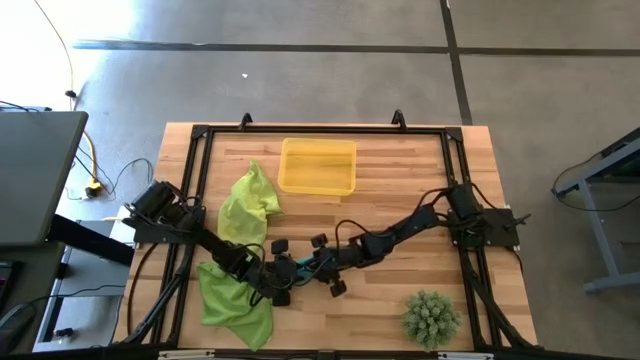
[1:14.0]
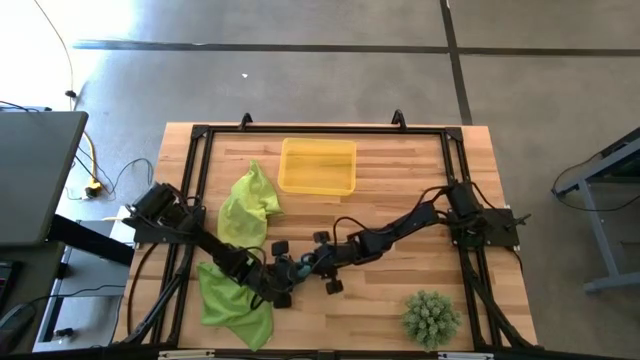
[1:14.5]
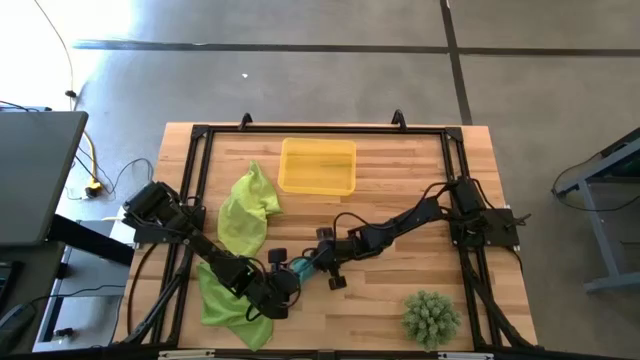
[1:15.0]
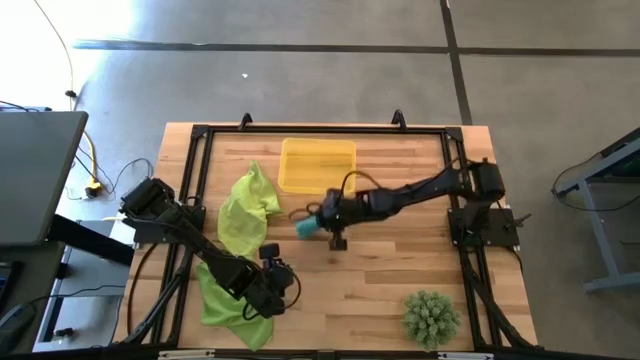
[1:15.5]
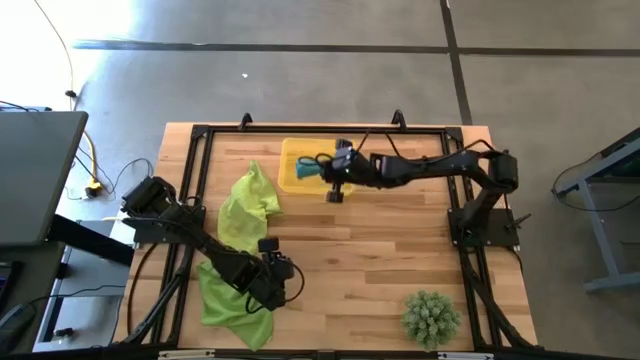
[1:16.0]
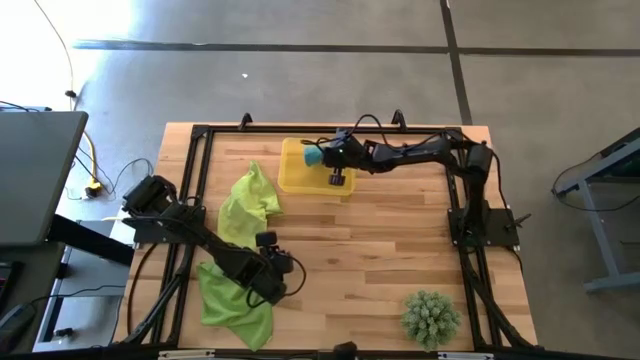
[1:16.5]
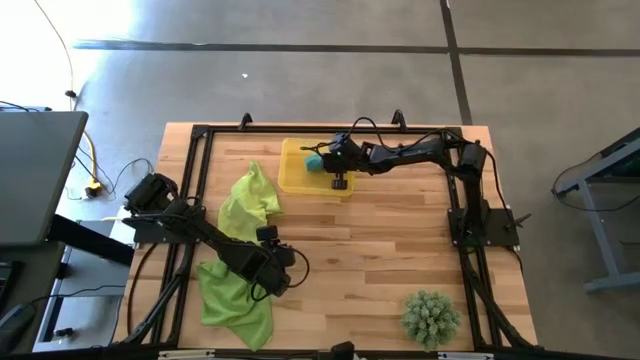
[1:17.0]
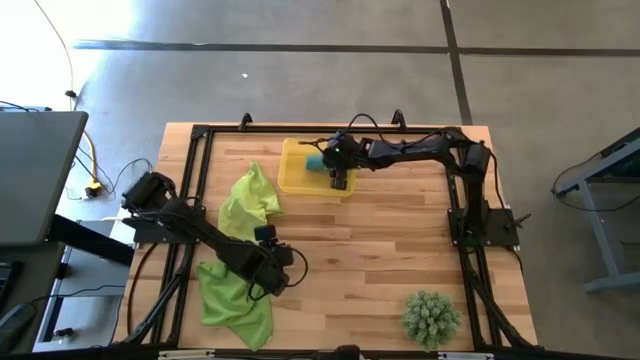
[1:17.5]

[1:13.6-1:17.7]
Task: Roll microfiber towels into tight, uniform cylinder then place into a basket
Put the rolled blue microfiber towel into the bin

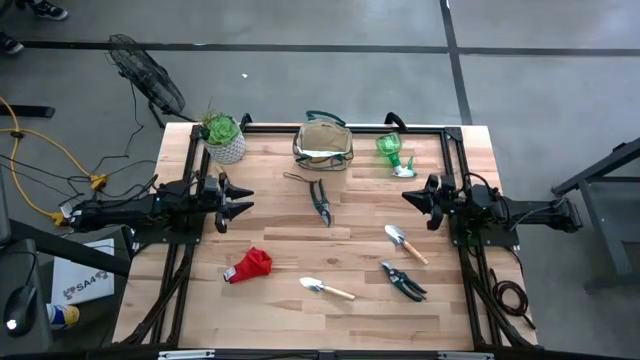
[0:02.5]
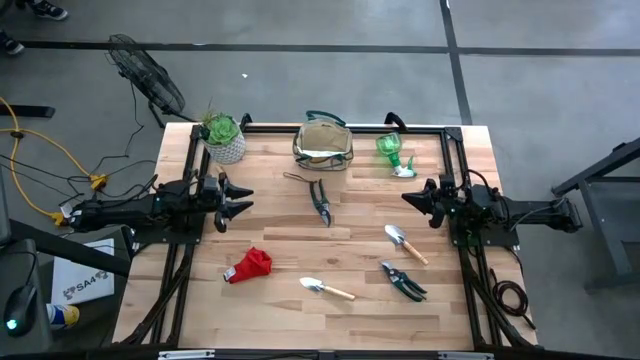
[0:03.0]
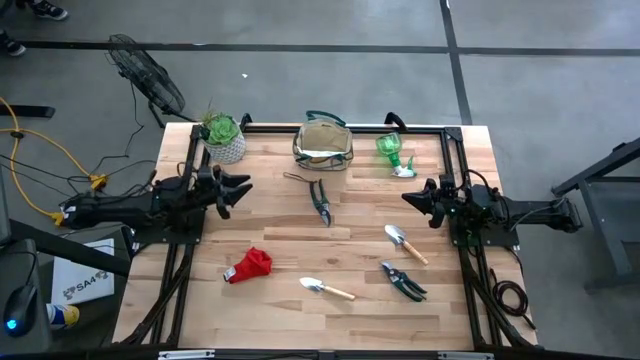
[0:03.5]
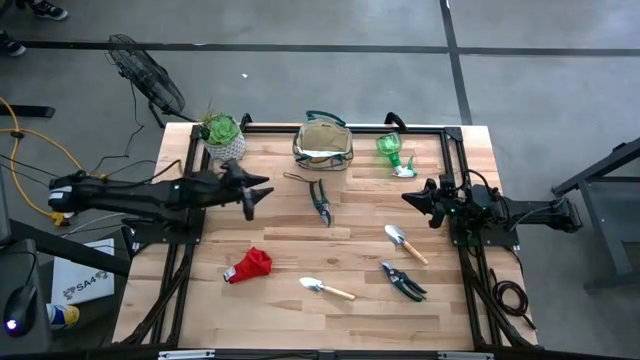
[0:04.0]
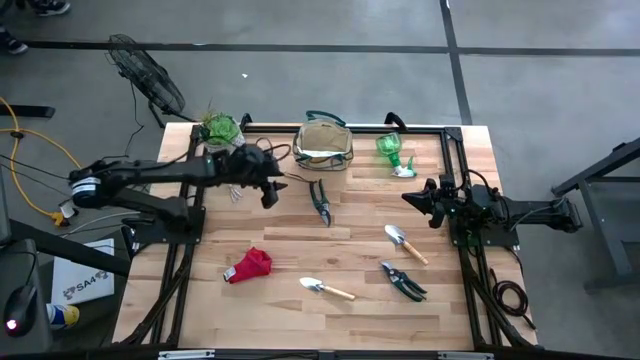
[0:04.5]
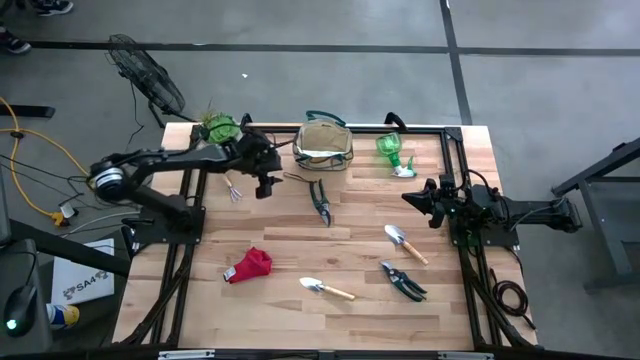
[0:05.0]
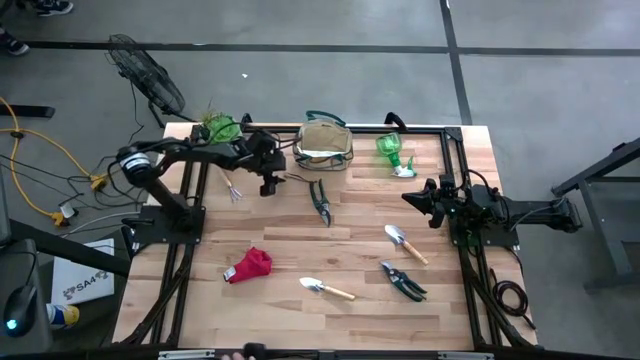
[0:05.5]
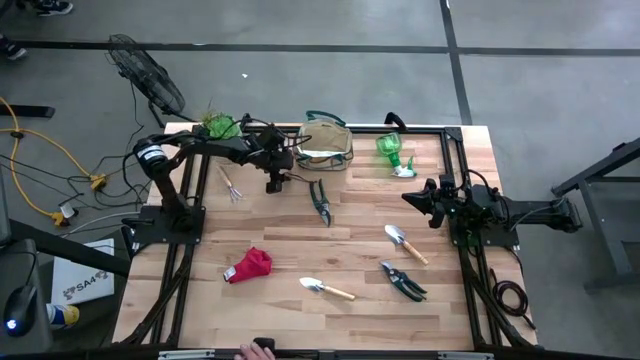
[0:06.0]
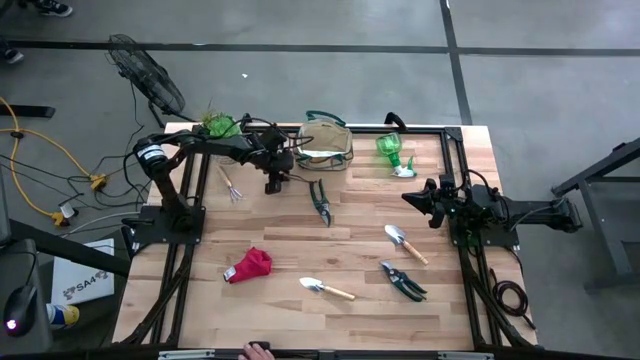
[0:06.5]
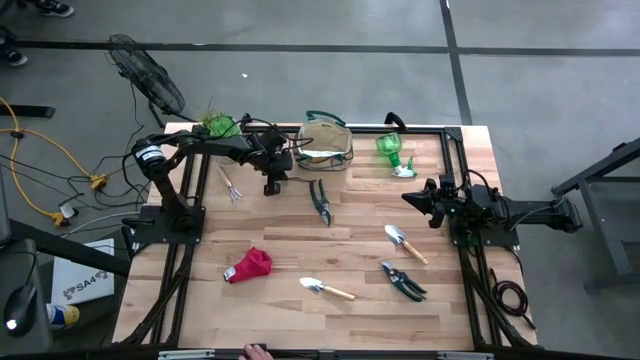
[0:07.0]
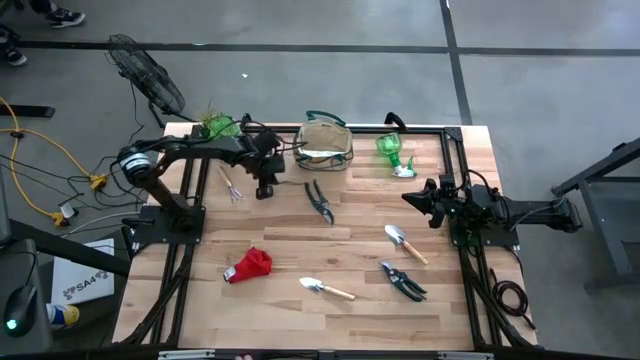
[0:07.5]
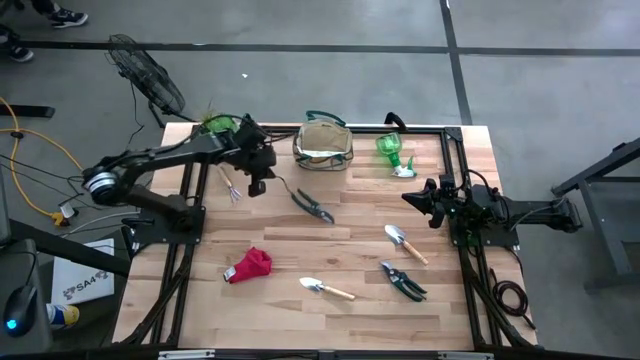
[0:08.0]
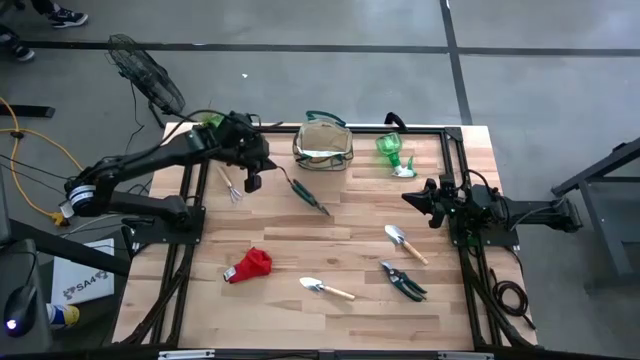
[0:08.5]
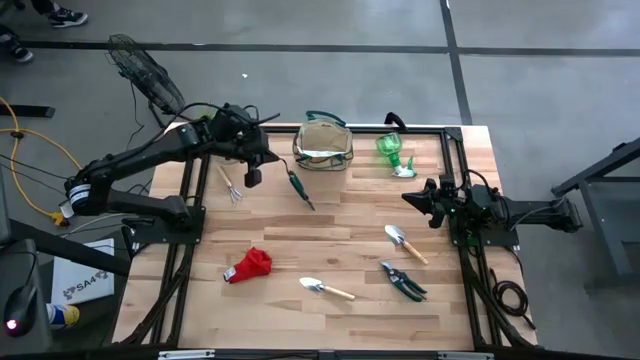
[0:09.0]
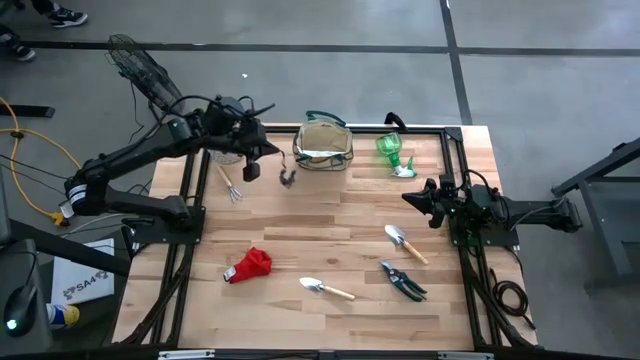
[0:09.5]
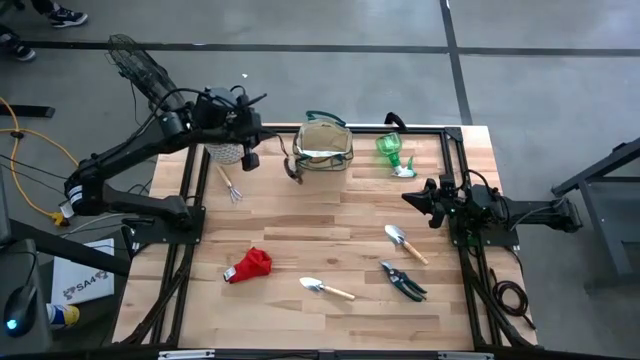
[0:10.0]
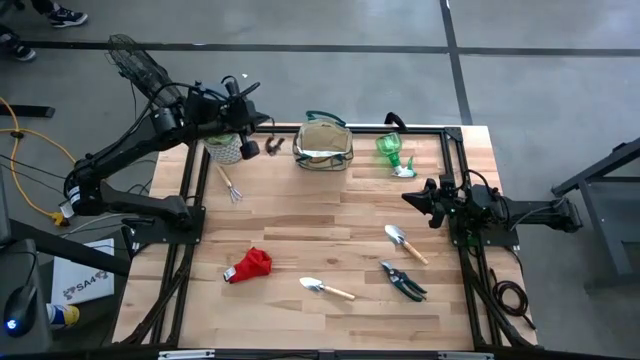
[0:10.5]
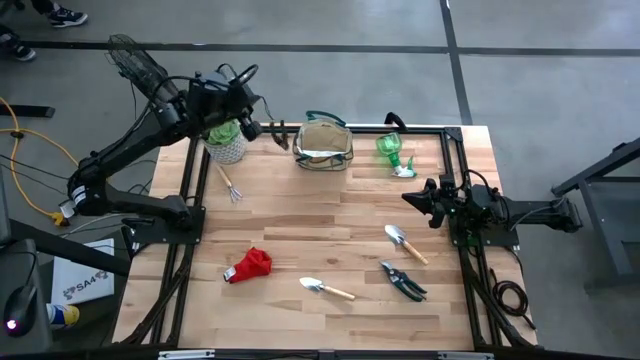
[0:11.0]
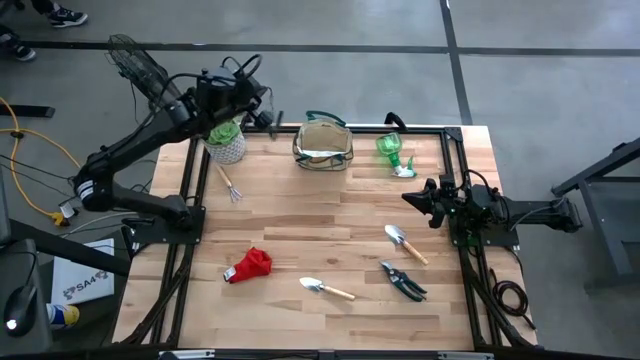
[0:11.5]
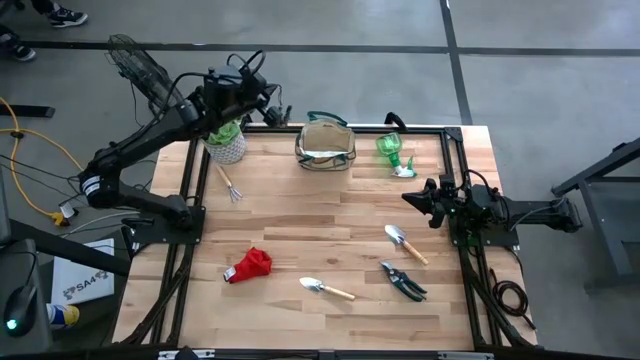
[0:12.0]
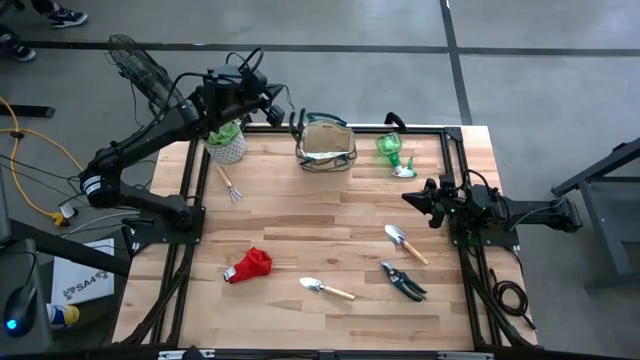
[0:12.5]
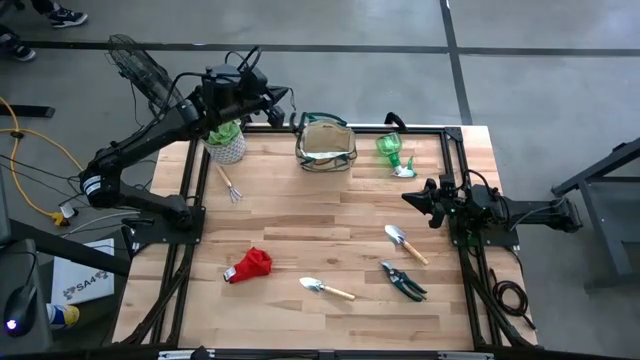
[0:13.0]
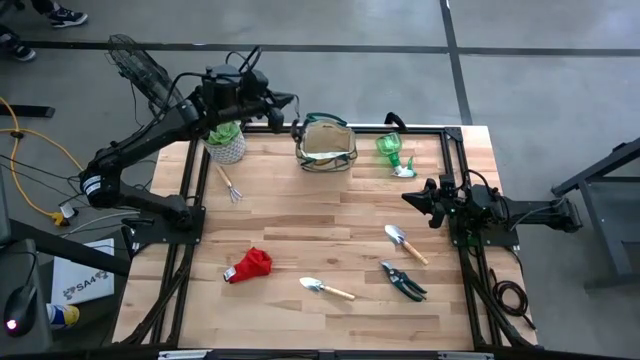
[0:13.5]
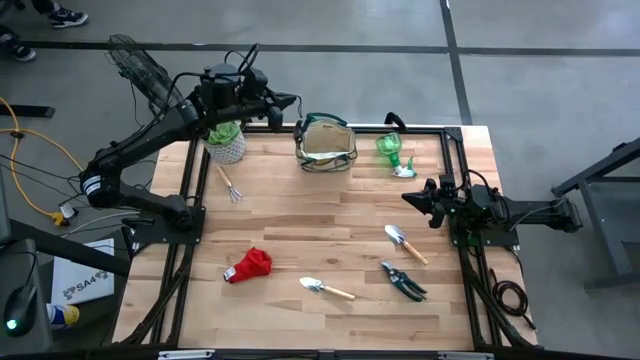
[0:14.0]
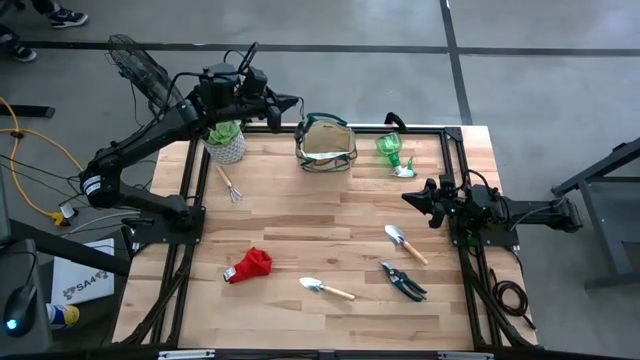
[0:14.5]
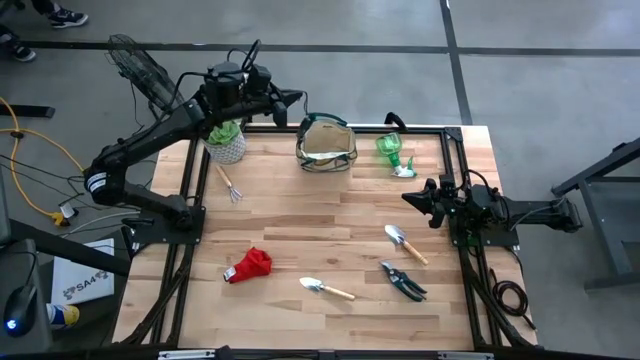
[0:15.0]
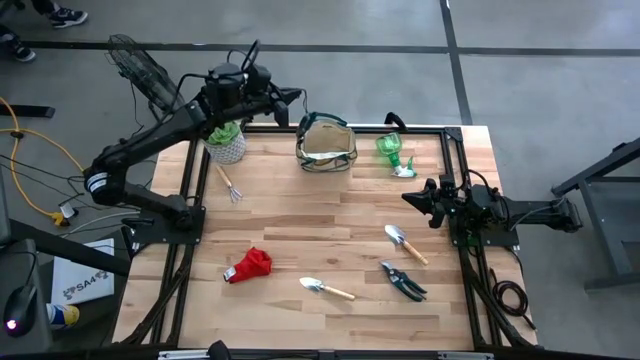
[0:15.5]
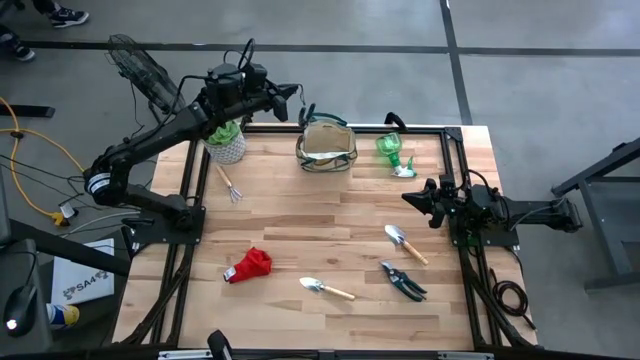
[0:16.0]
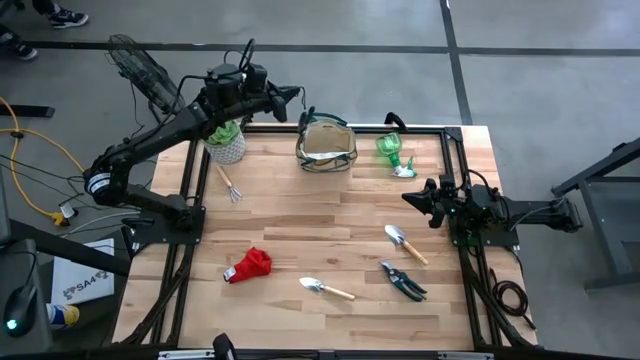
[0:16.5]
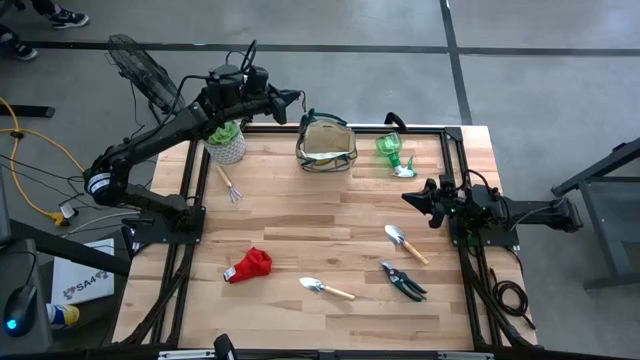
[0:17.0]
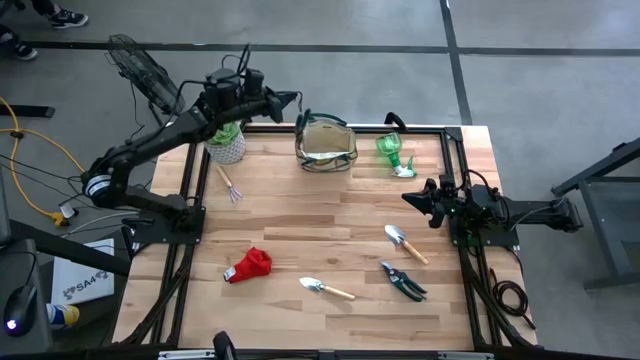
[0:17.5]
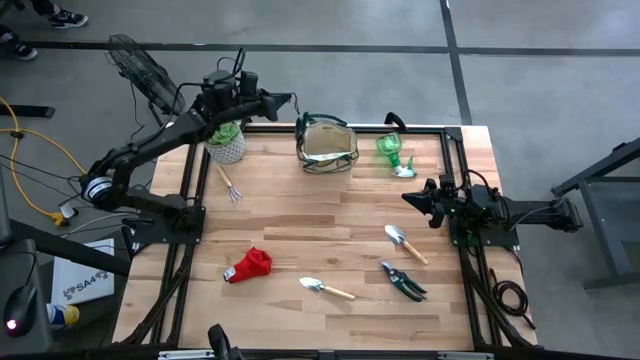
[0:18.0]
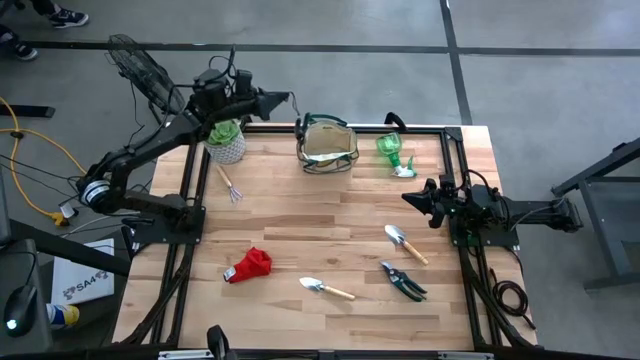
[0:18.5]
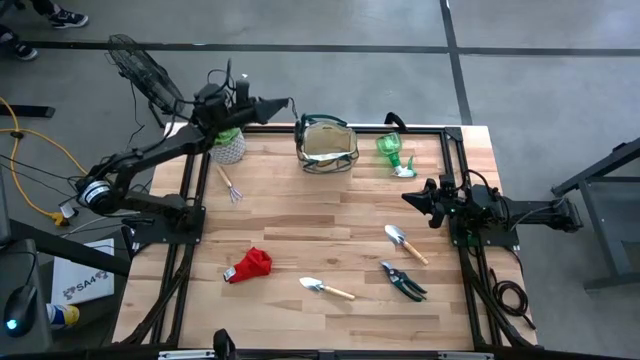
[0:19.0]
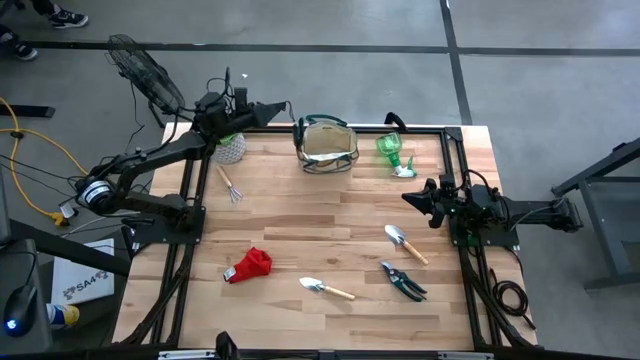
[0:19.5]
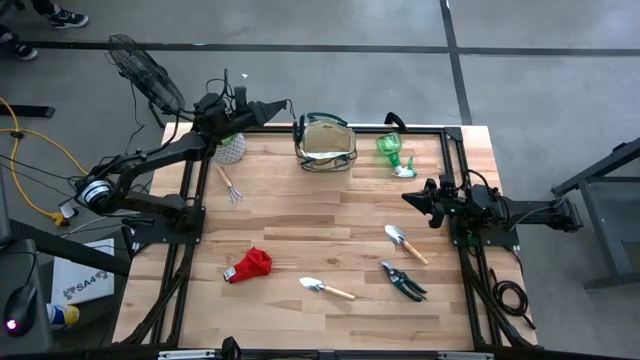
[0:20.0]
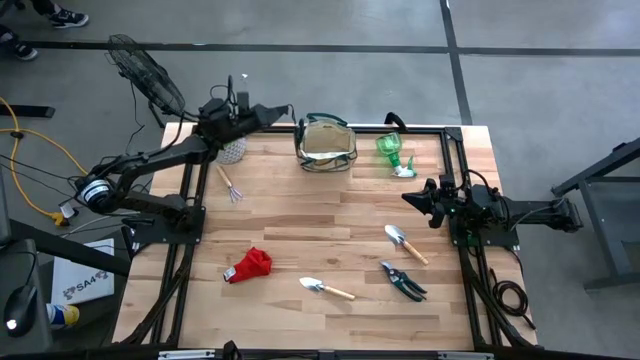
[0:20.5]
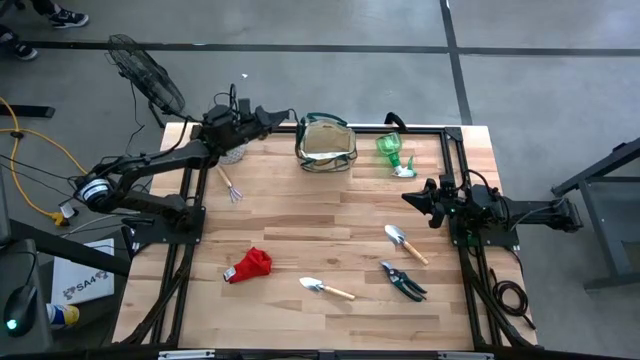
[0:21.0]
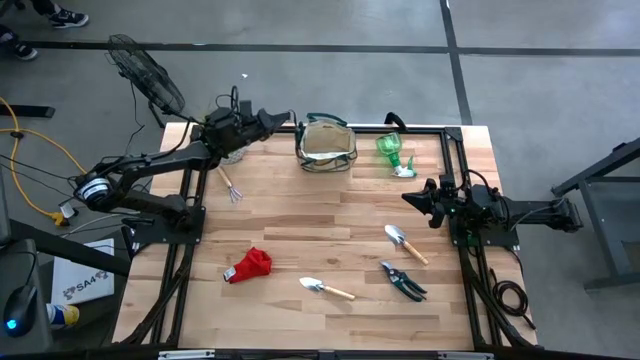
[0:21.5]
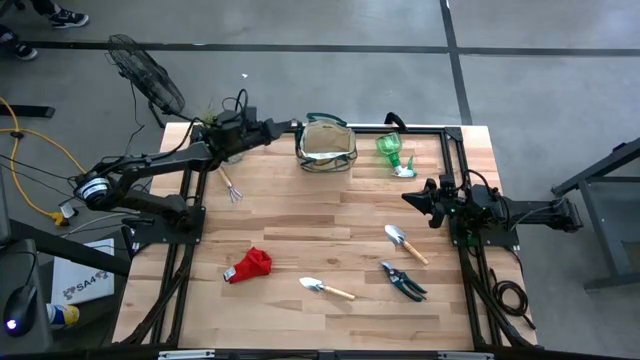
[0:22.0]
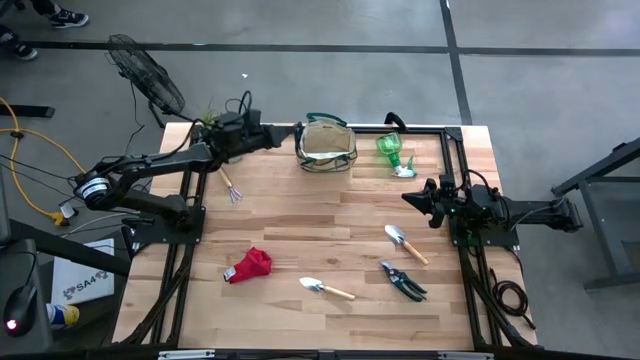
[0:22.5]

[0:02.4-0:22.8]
Task: Pick & Place Garden tools in Gardening bag
Put the top shear scissors into the gardening bag
